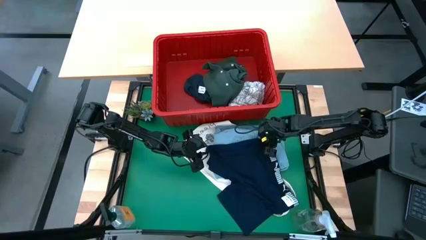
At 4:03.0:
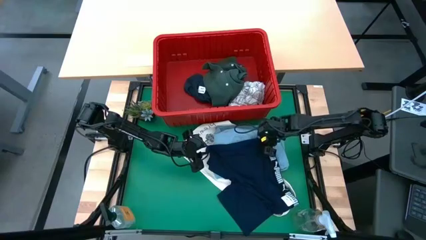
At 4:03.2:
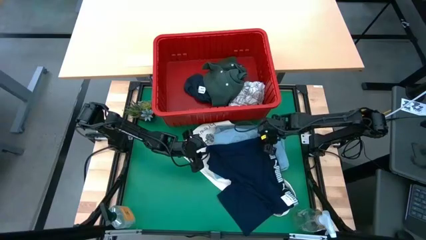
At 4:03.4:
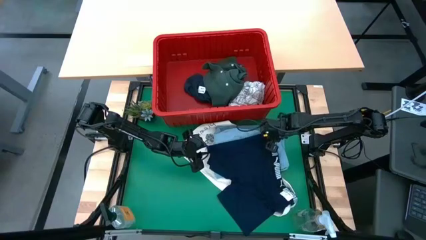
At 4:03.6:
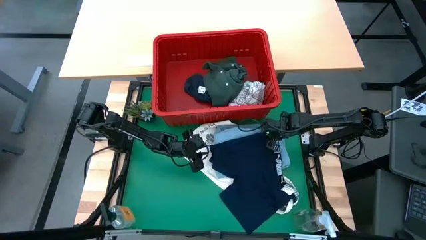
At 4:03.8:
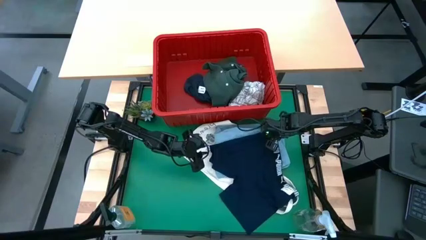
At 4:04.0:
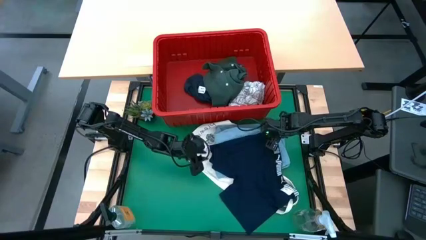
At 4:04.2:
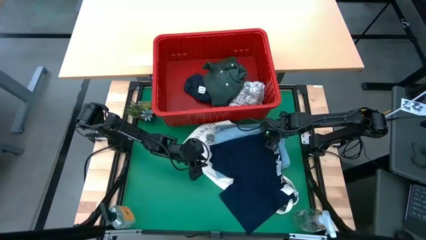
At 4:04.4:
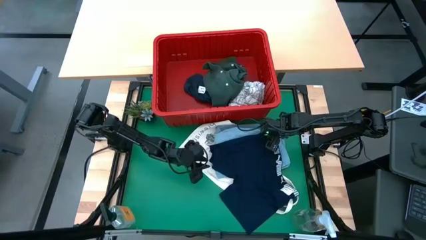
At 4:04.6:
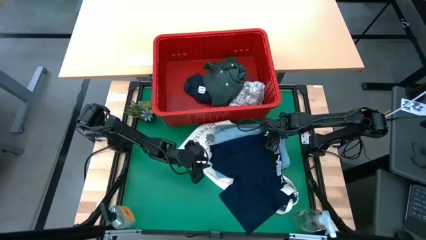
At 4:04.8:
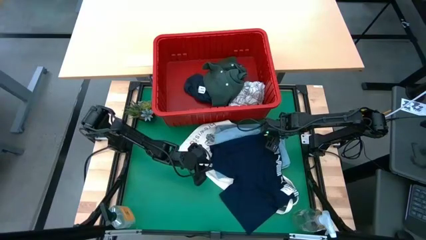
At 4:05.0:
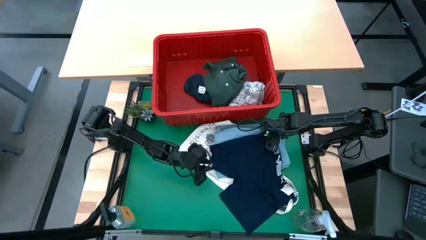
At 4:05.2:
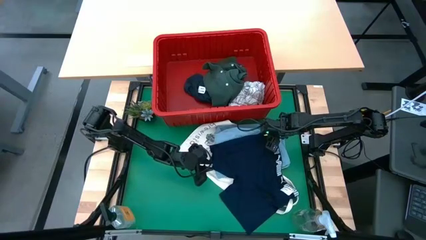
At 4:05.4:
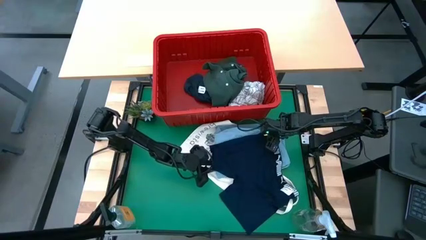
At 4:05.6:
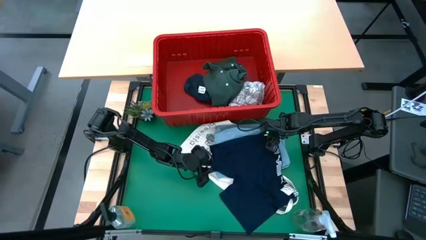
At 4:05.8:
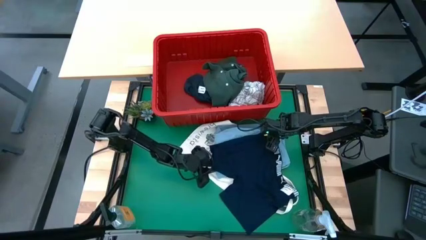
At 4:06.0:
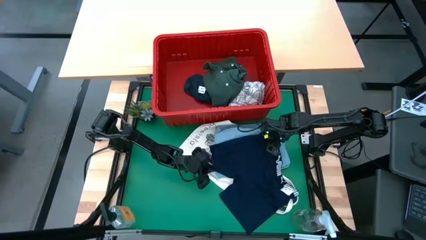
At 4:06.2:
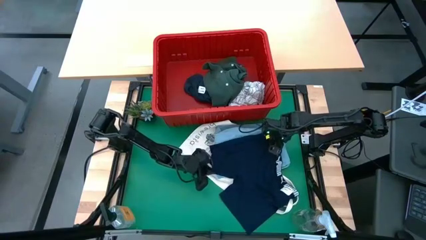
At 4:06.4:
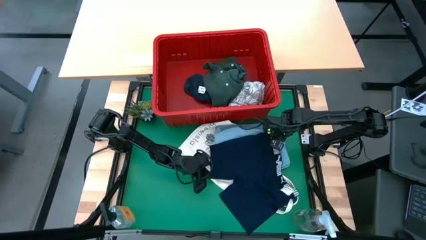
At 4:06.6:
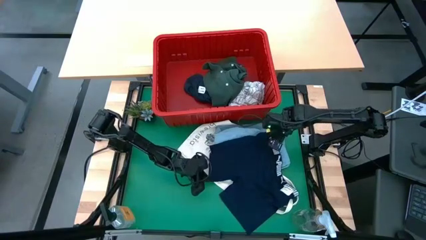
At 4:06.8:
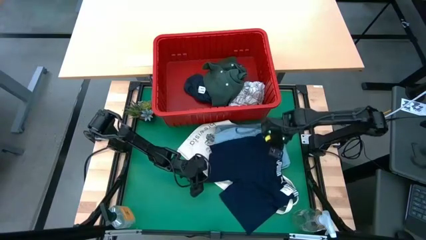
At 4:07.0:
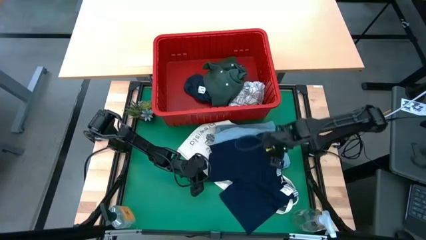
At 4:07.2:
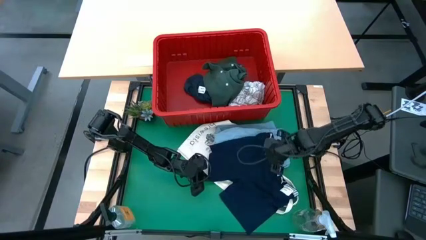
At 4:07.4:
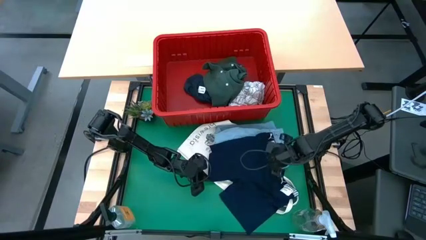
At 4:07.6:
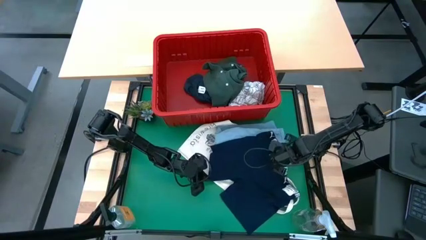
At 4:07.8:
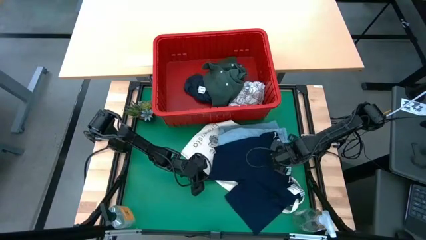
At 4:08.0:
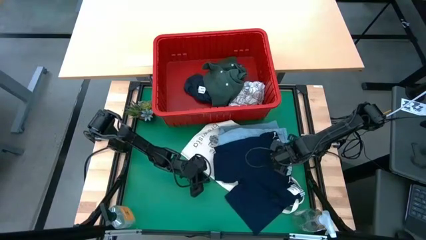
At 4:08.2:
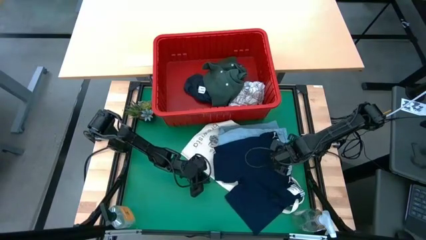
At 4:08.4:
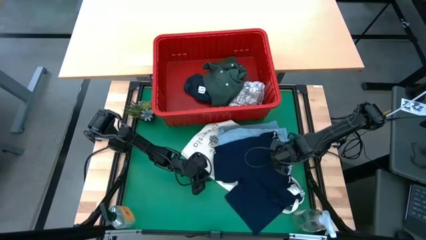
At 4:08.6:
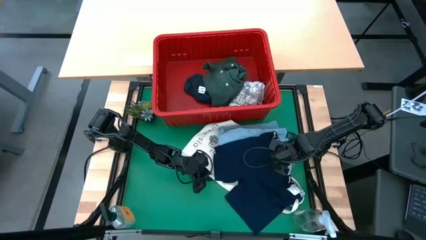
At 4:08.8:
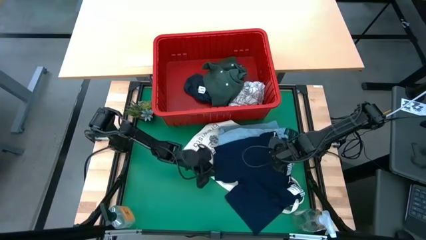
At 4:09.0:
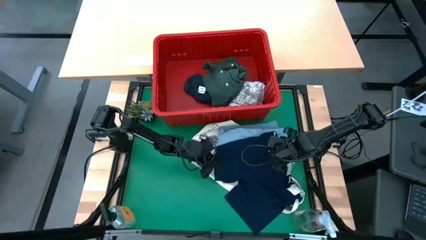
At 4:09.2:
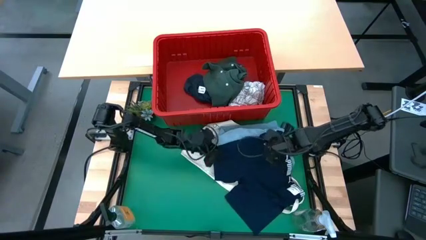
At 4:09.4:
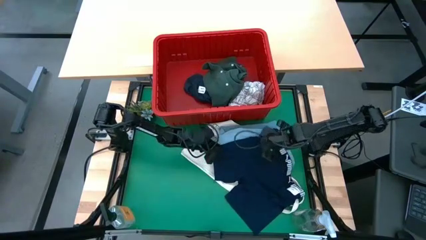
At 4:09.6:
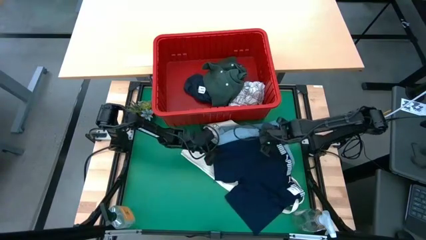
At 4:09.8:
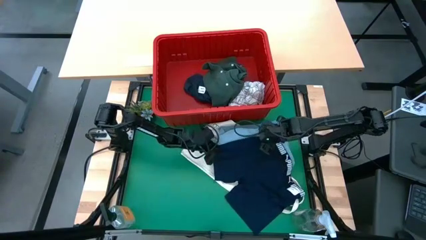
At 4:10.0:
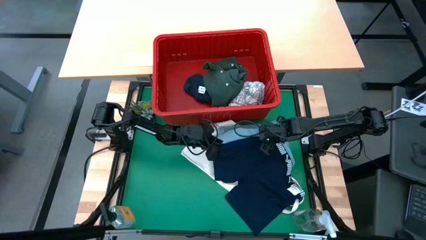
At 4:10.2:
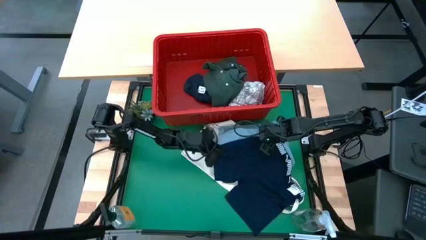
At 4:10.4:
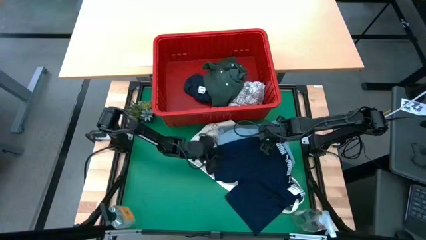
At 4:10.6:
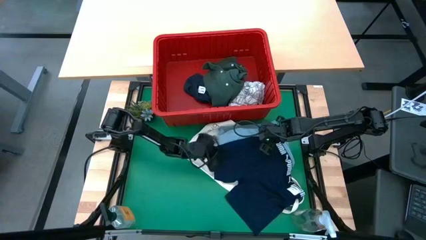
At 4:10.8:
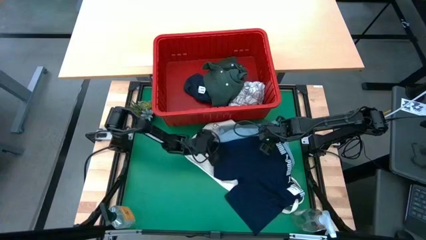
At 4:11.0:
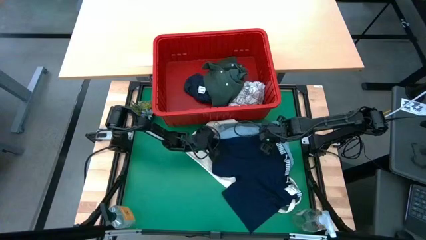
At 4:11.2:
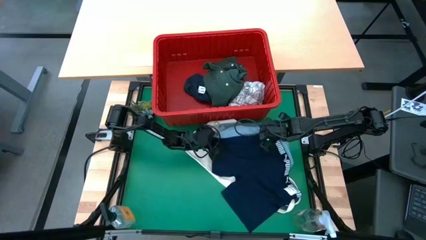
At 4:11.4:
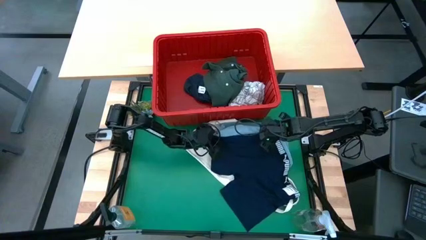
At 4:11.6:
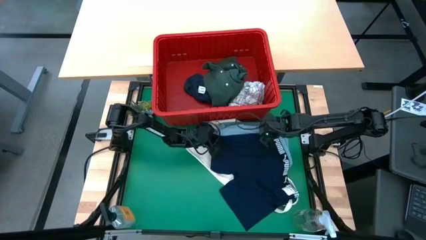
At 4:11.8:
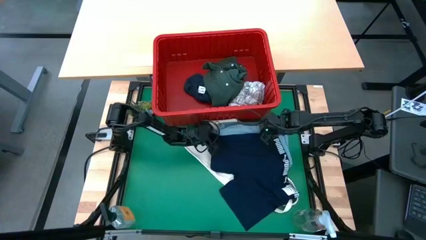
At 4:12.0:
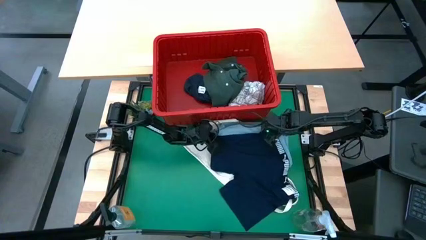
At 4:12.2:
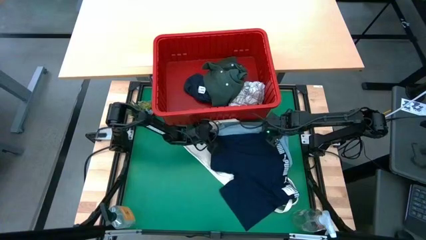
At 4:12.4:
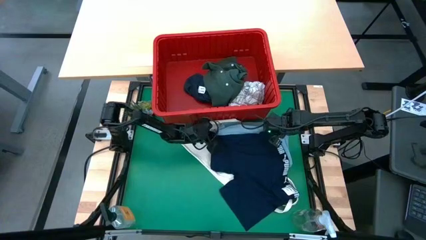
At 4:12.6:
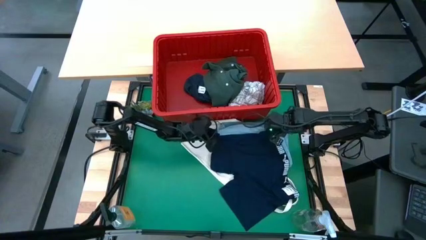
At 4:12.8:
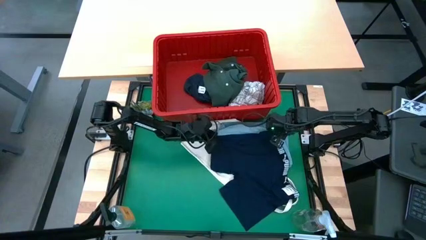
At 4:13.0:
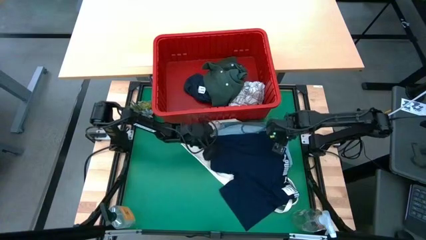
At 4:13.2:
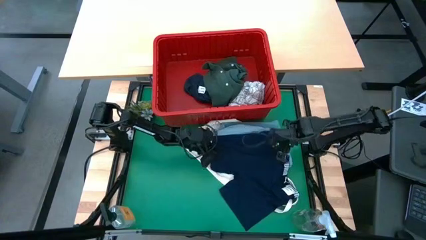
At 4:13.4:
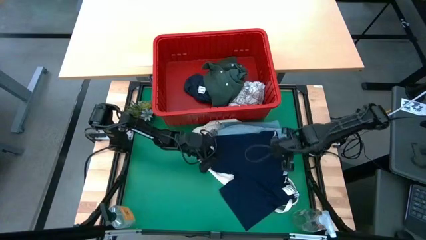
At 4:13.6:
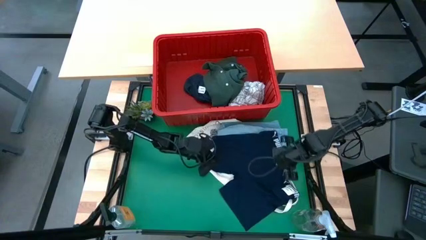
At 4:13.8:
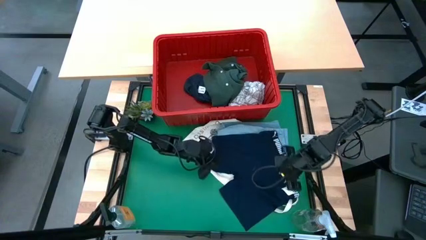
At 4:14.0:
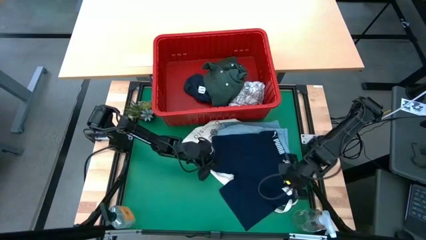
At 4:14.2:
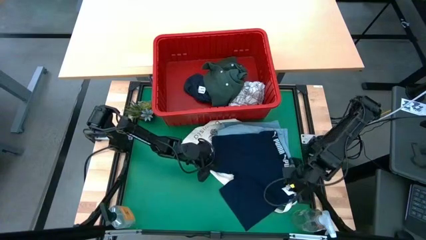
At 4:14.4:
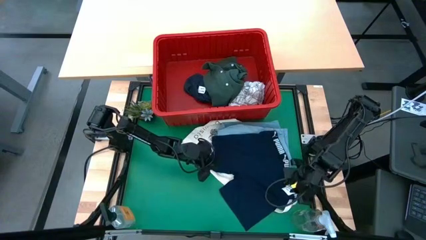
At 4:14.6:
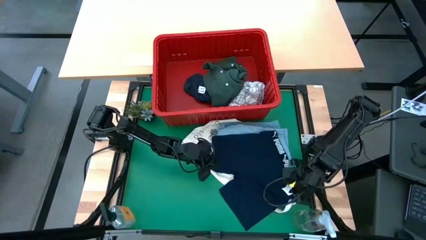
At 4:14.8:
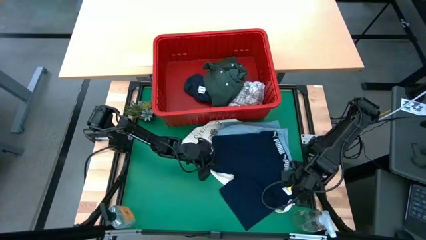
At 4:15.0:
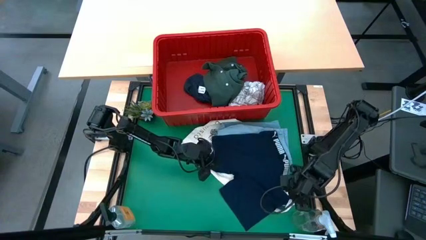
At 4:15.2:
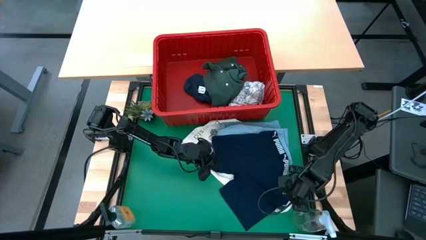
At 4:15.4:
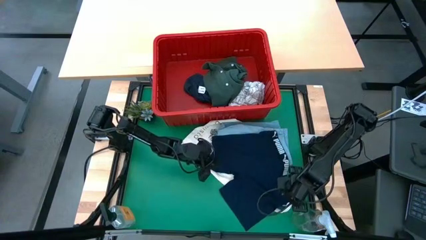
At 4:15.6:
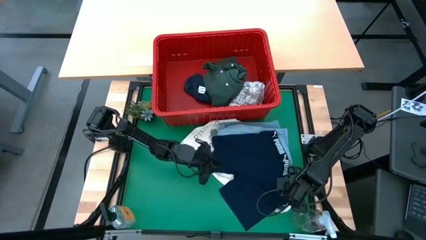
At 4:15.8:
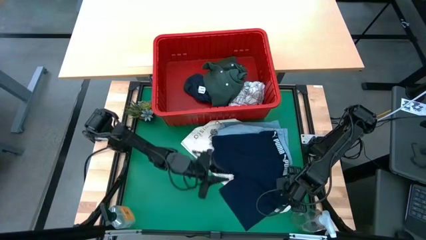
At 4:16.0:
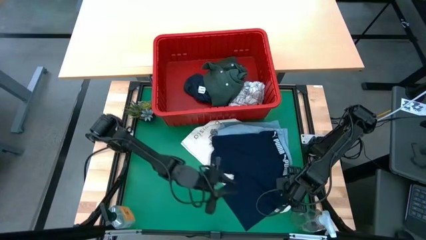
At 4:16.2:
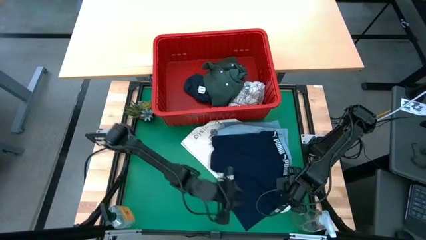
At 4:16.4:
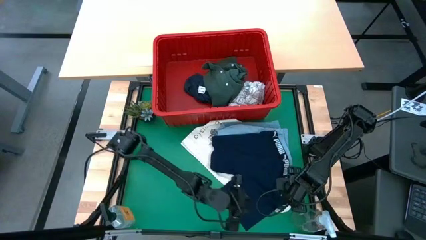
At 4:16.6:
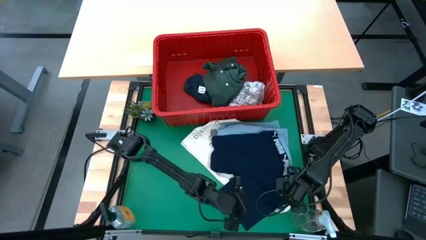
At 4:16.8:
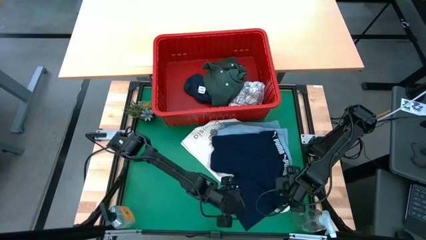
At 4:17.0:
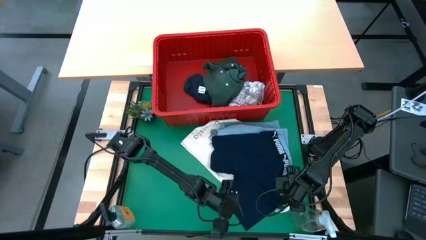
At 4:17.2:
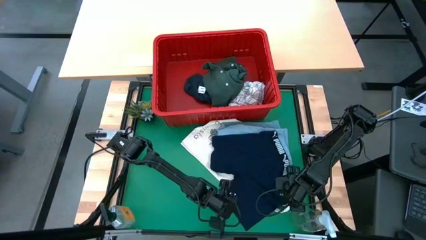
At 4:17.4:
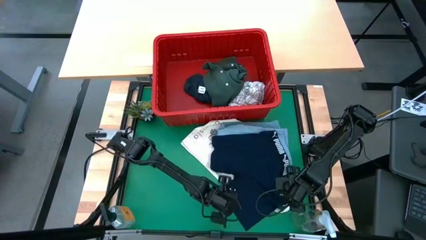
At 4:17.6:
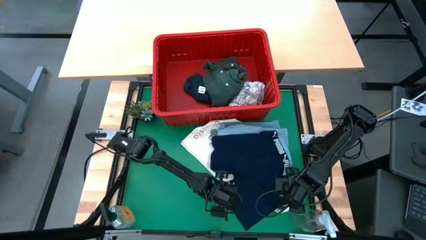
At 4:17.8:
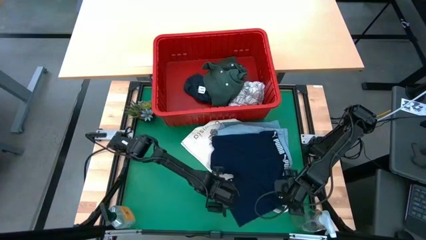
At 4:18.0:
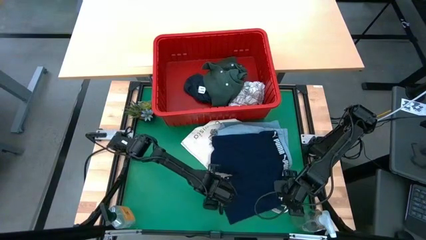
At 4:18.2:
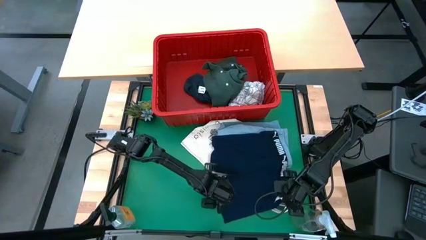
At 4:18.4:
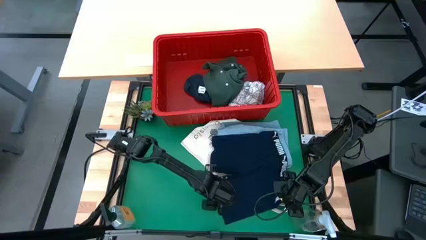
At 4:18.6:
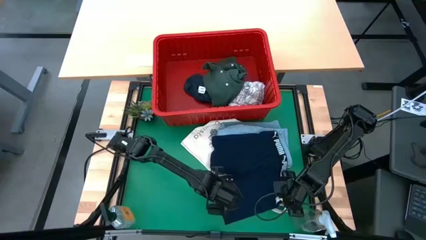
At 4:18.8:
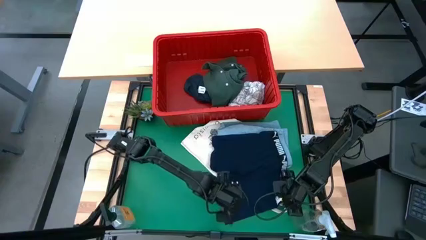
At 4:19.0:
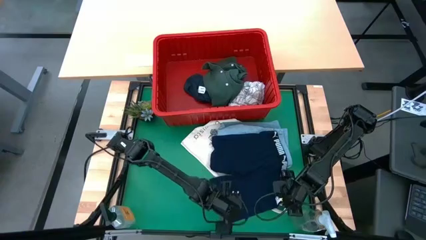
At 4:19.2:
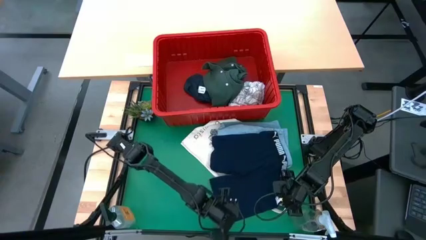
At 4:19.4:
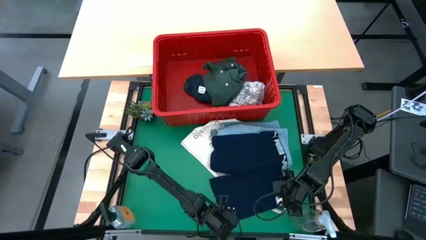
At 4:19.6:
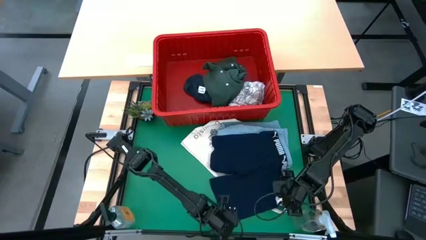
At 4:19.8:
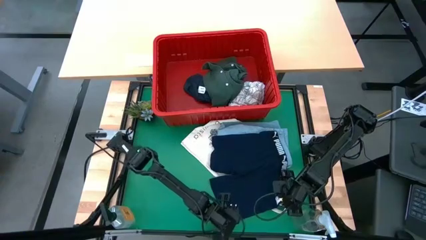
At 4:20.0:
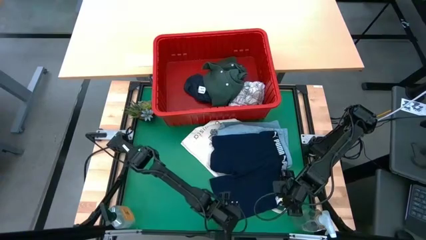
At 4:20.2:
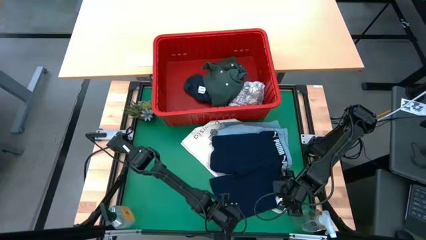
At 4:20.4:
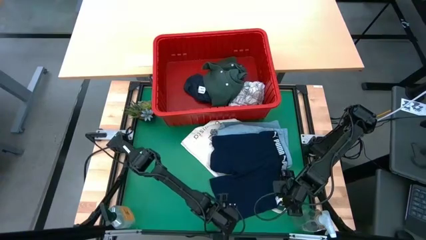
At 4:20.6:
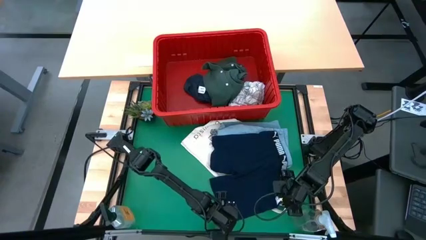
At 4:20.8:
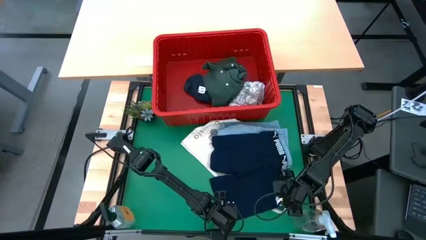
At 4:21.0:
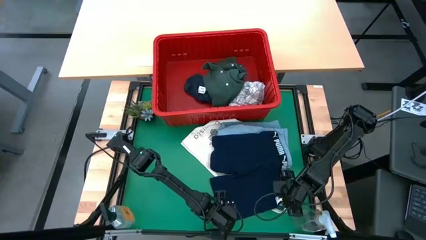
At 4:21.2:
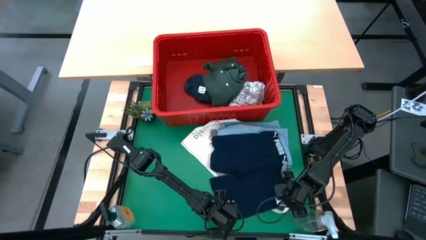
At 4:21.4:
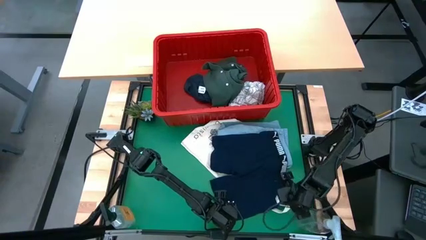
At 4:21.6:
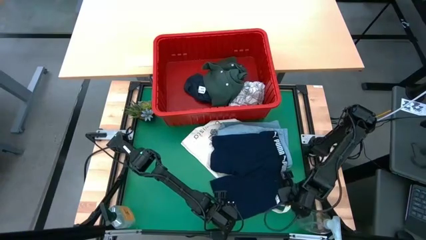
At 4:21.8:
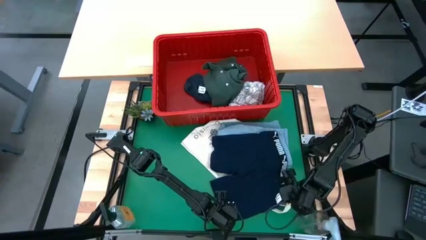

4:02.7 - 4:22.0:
Task: Fold laundry
Fold the dark blue boxer
